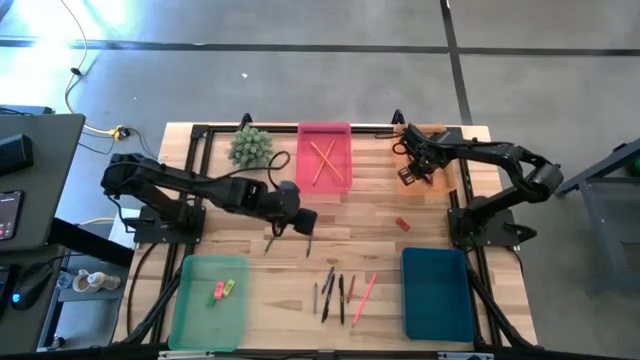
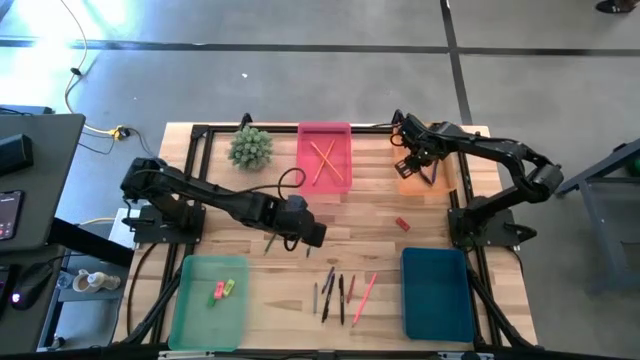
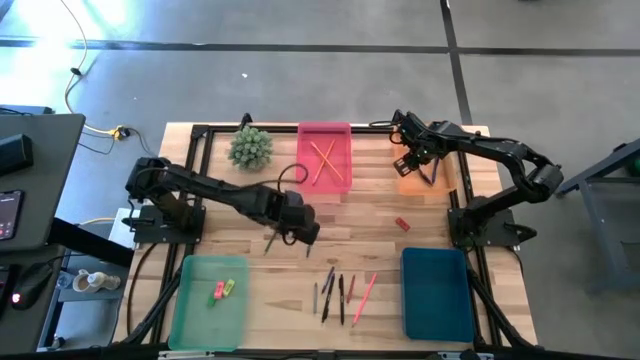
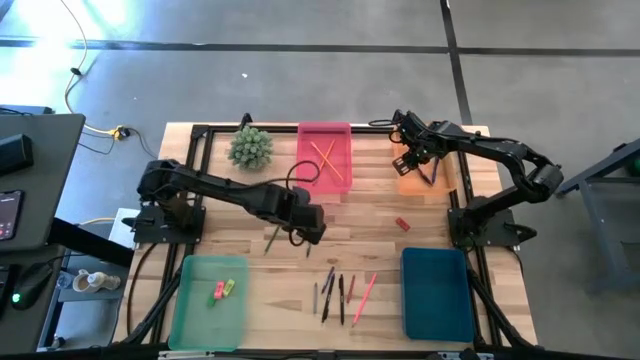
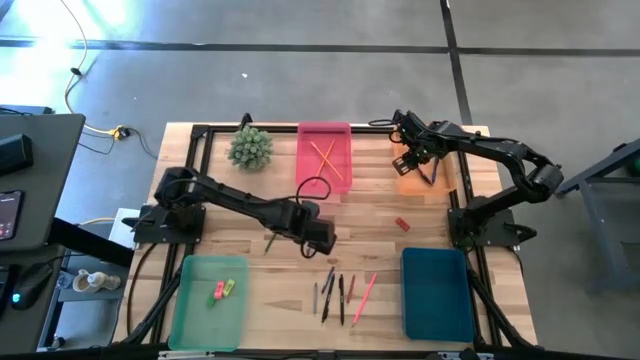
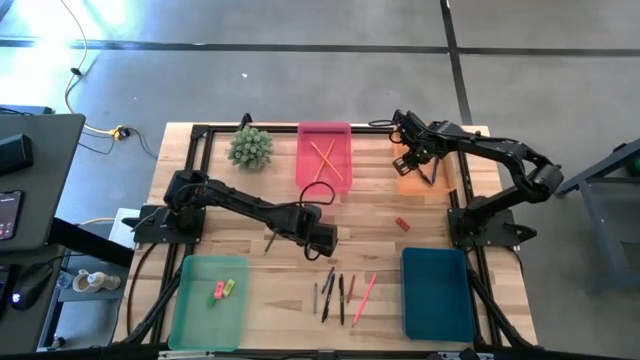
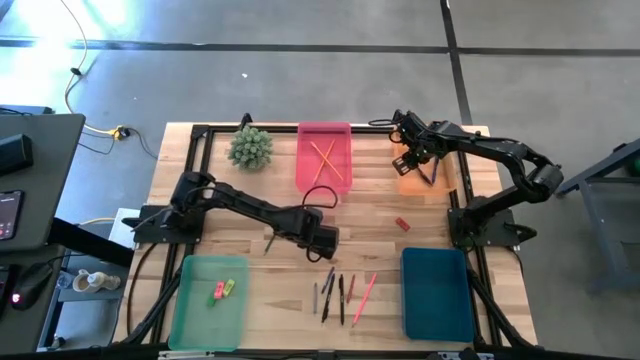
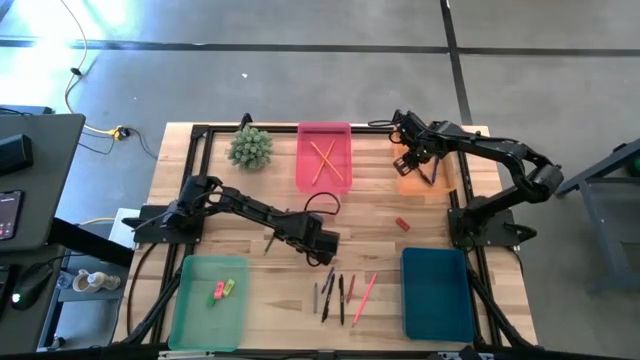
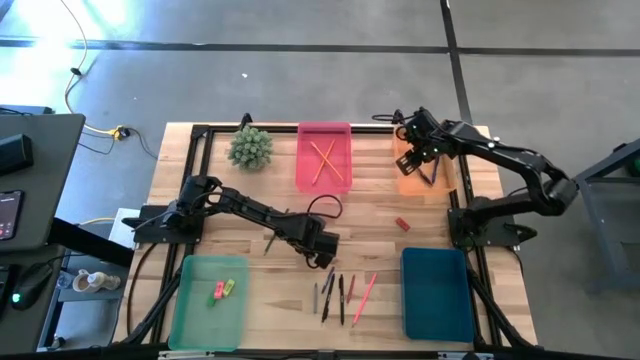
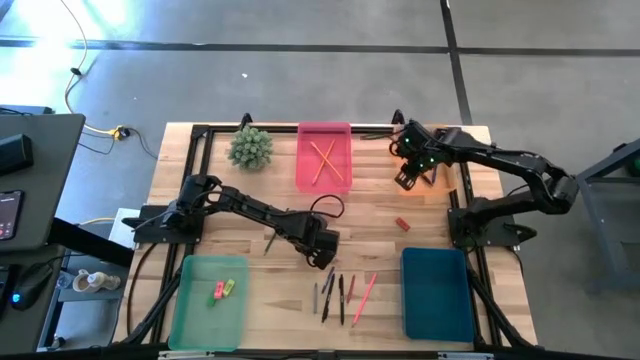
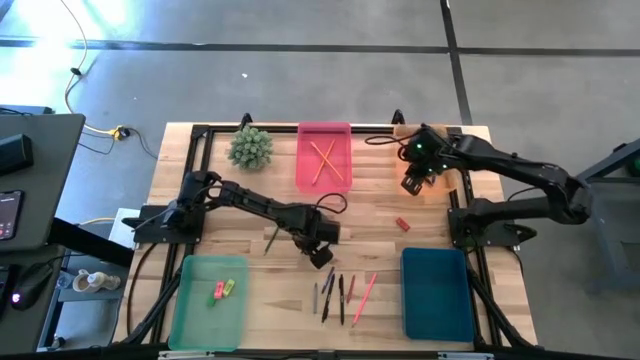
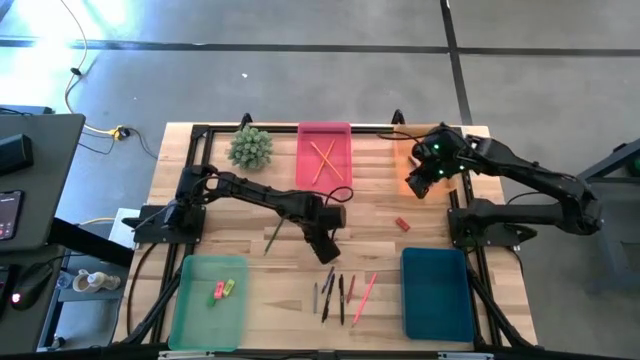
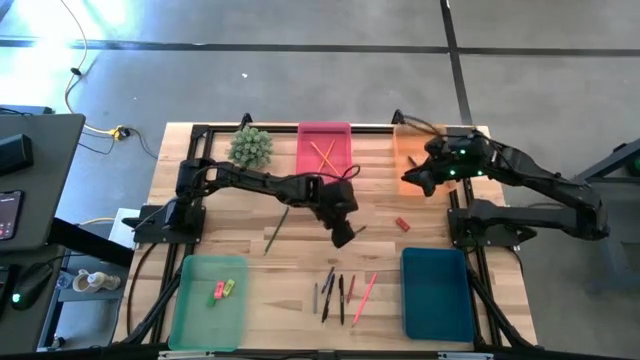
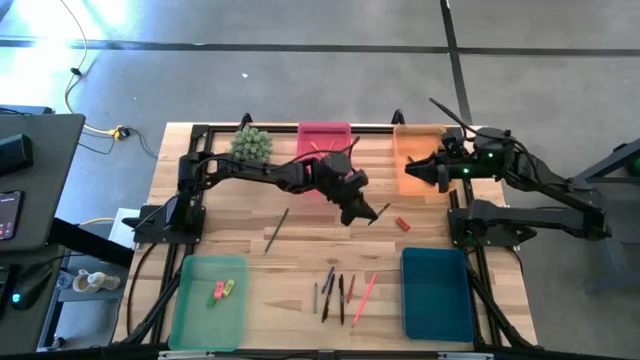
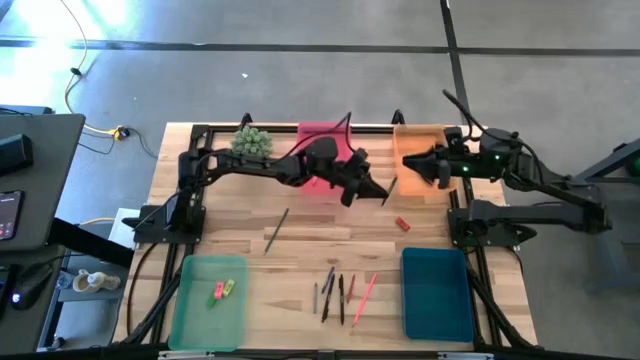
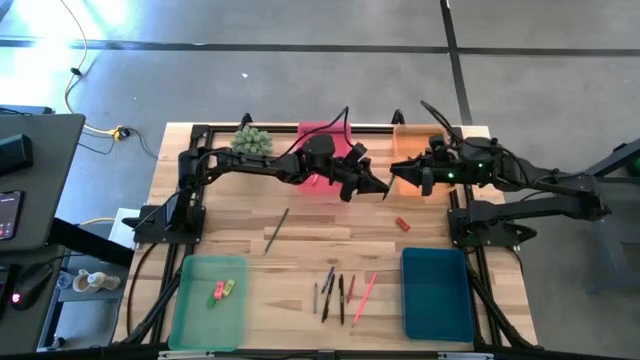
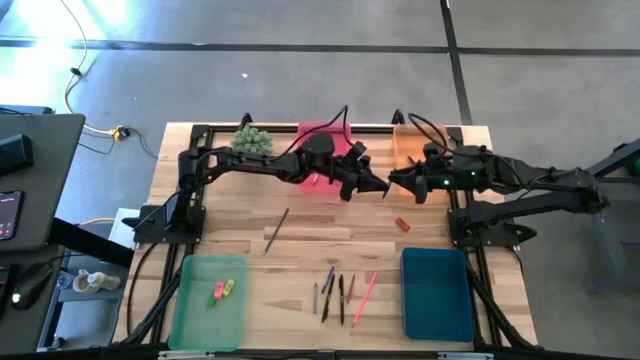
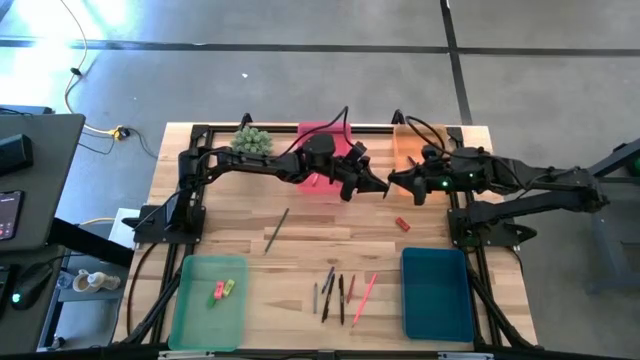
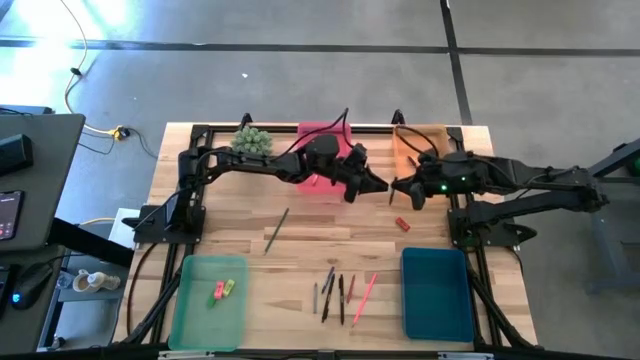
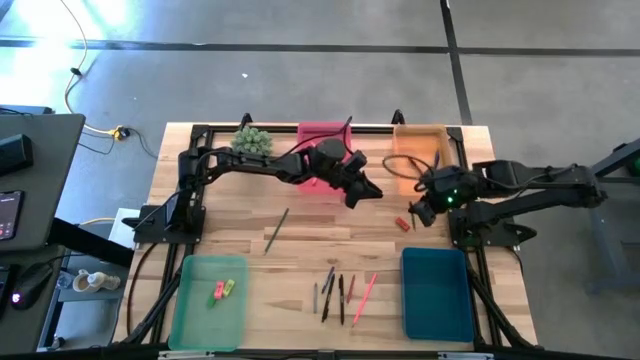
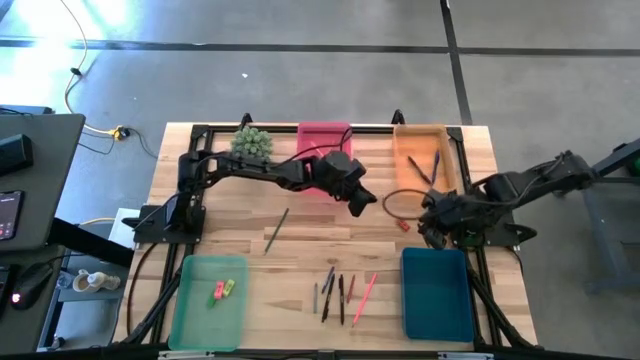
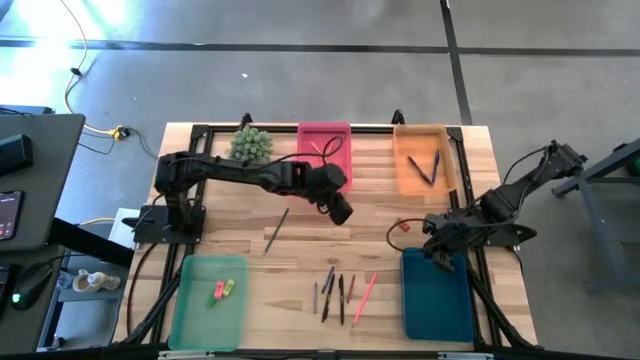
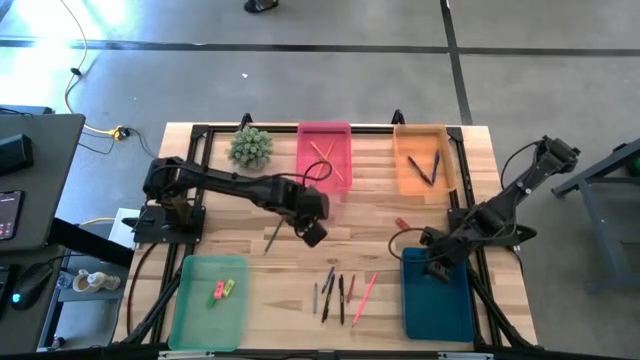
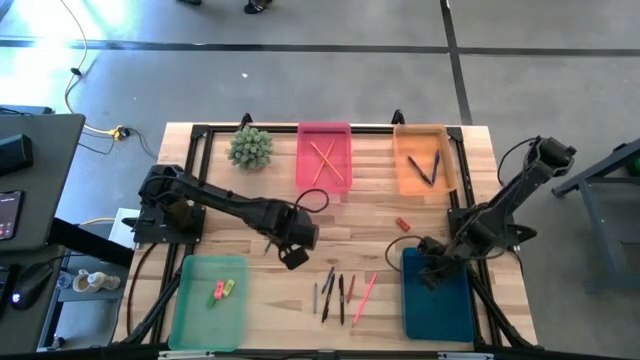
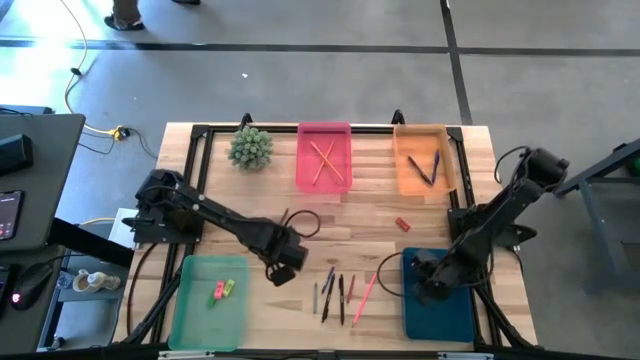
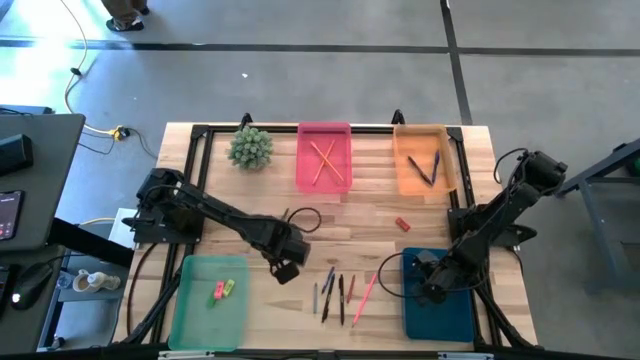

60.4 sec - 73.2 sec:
Task: Sort crayons/erasers/pens/pencils in bins
Put the green crayon into the blue bin

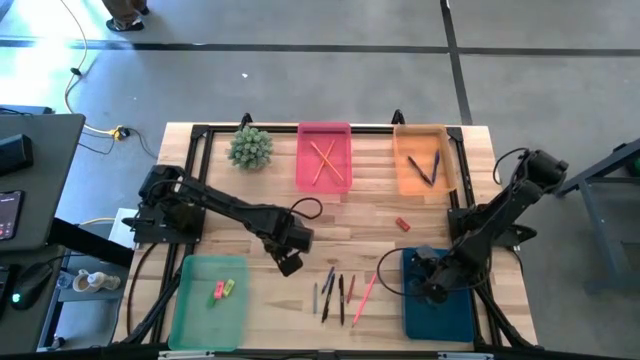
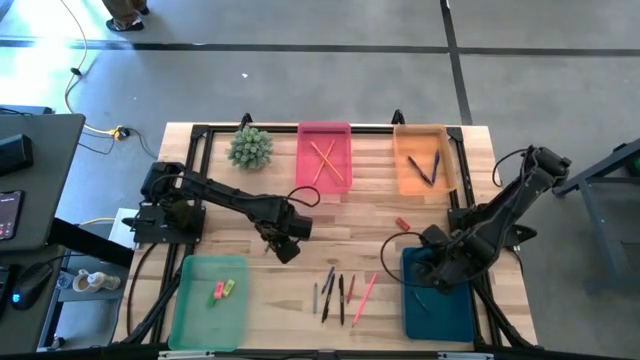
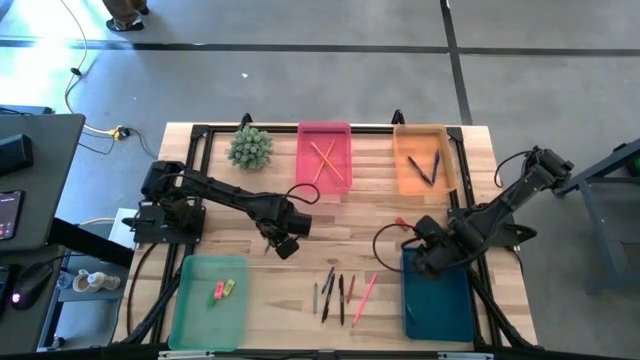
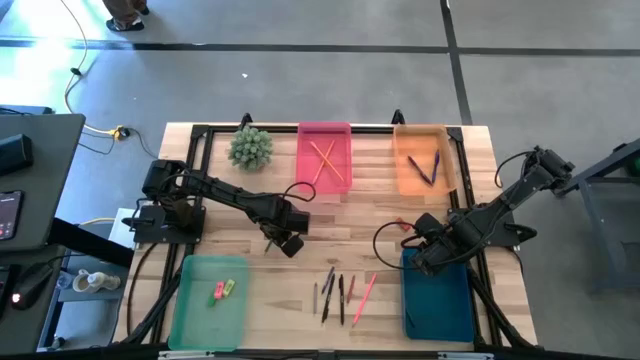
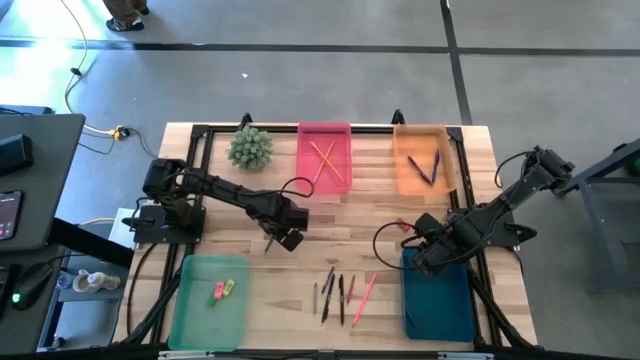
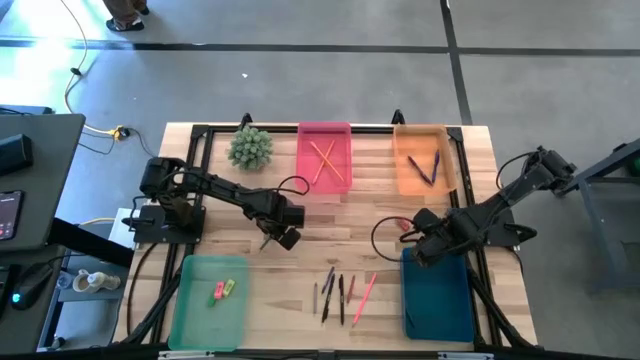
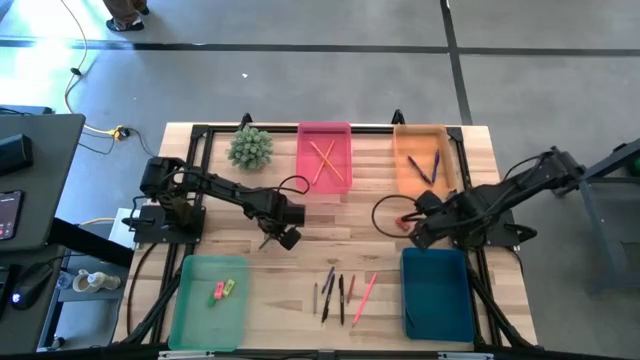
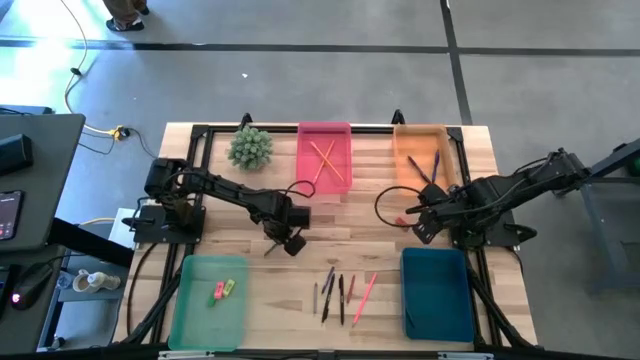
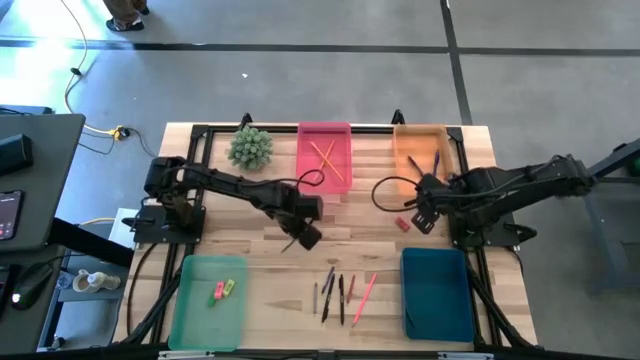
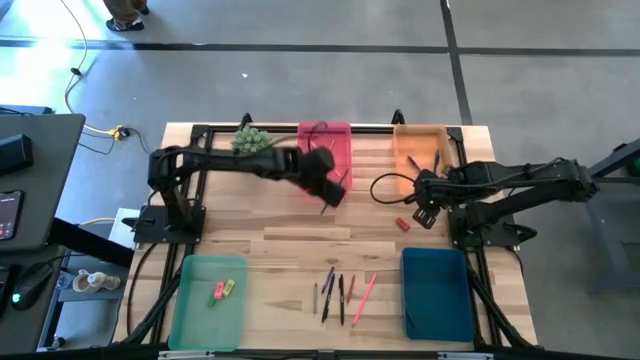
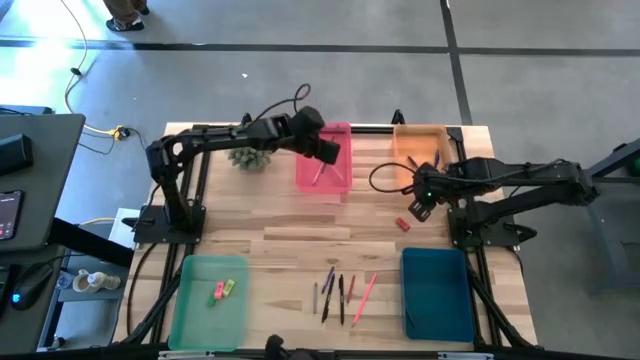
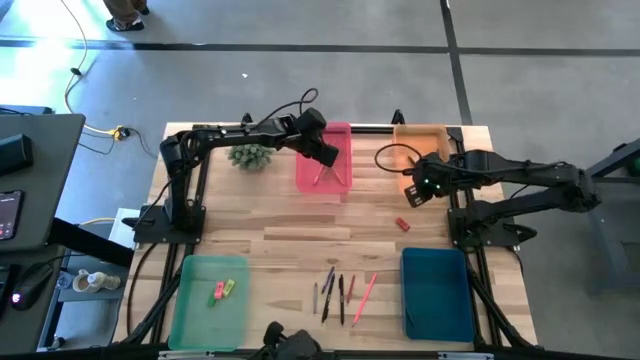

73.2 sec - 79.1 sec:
Put the green pencil into the red bin

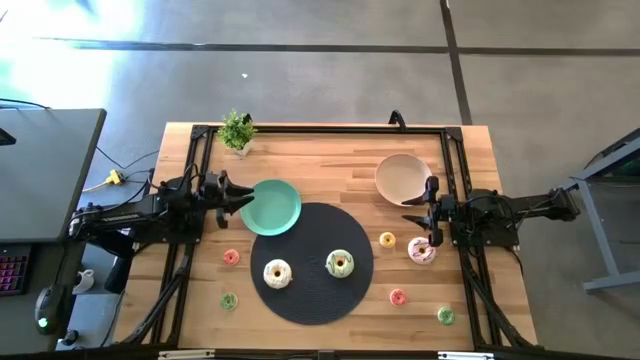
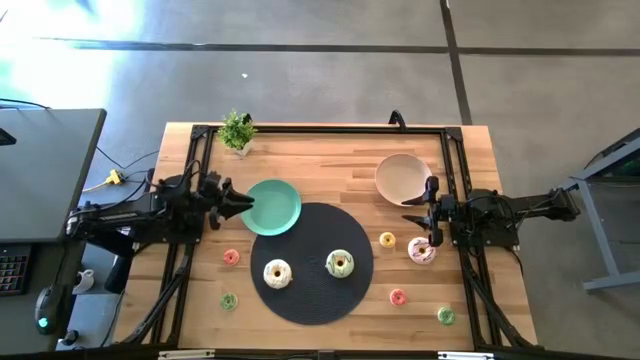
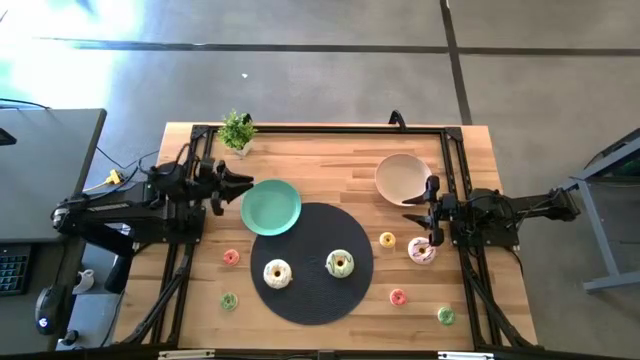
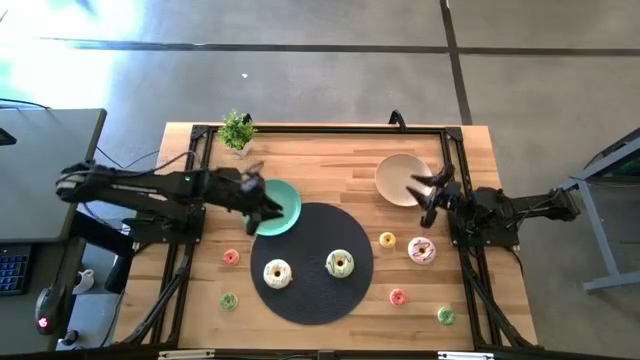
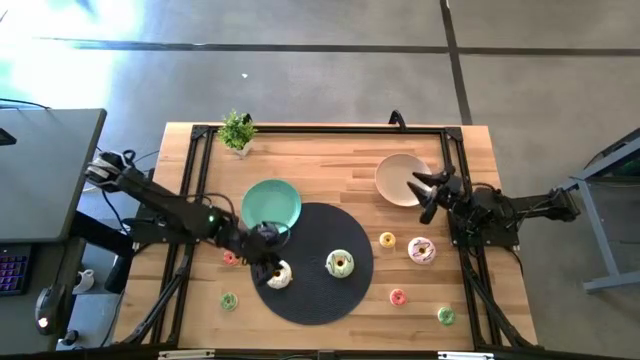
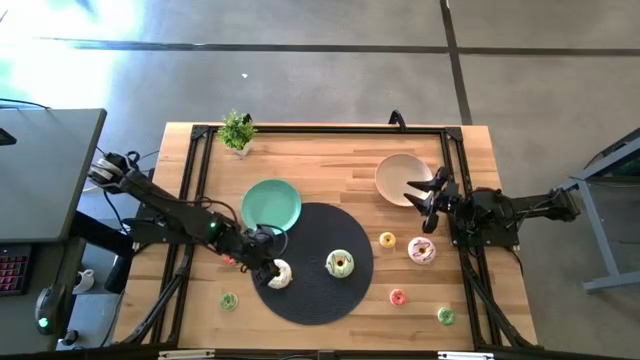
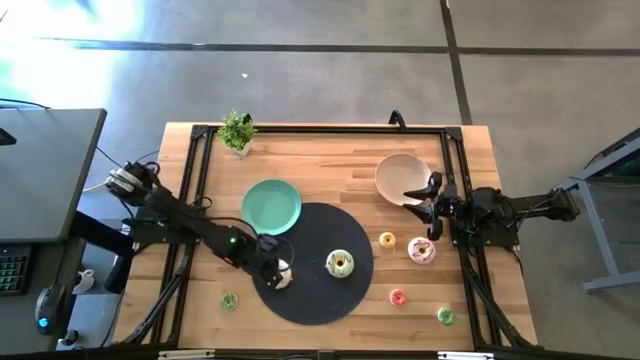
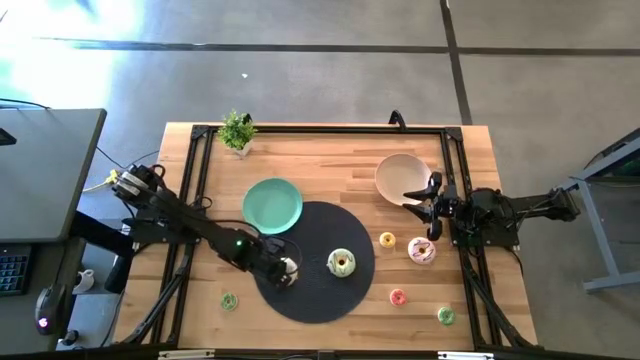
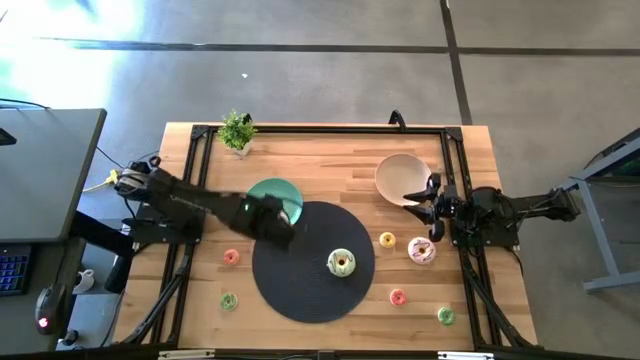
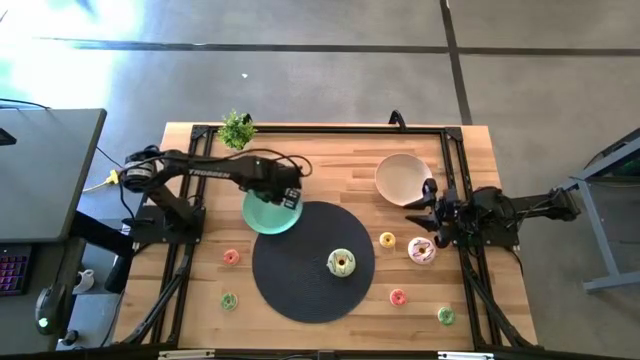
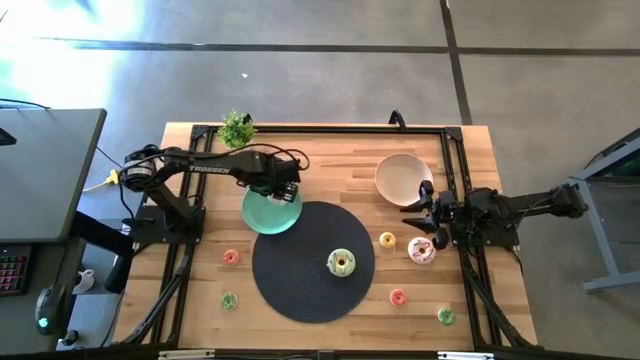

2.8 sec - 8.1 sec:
Task: Pick & Place donuts
Put the large white donut on the green plate
